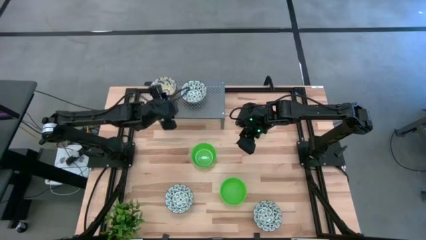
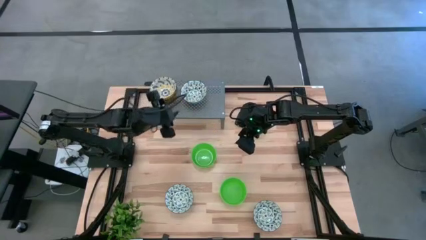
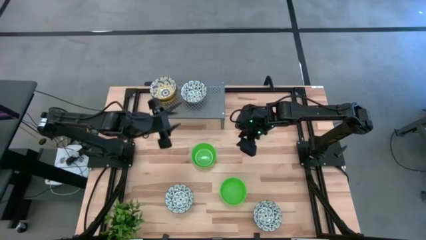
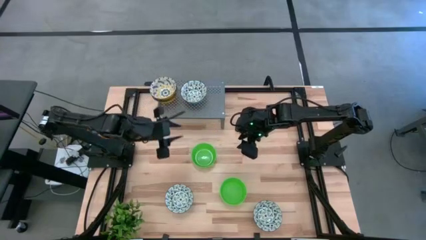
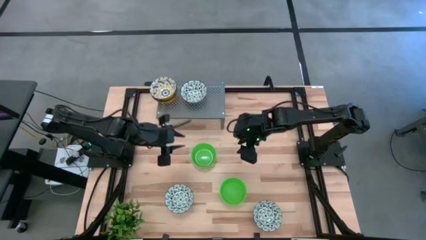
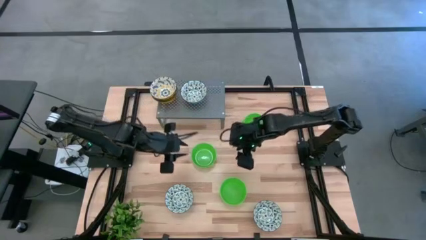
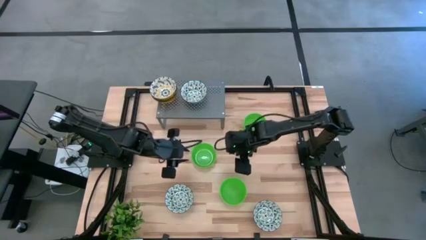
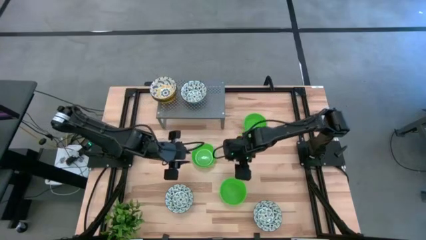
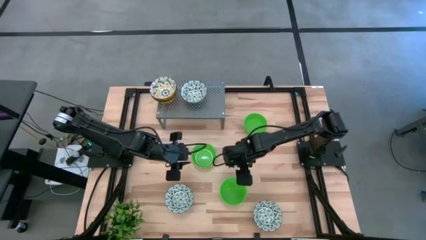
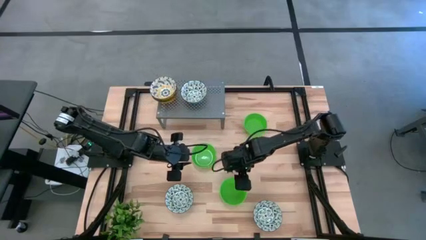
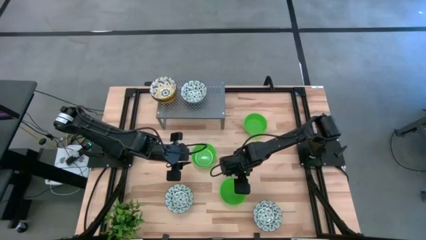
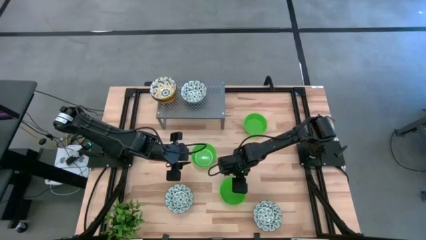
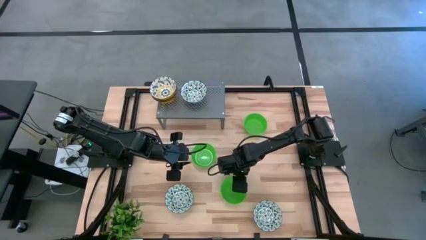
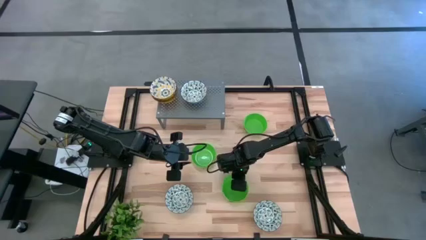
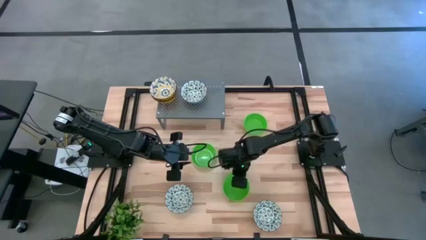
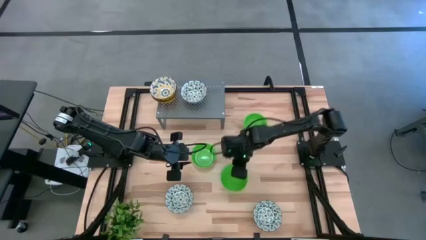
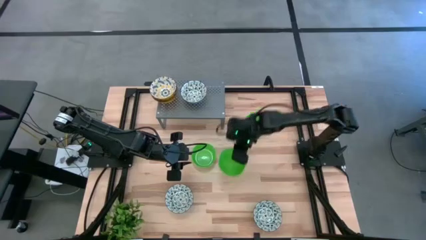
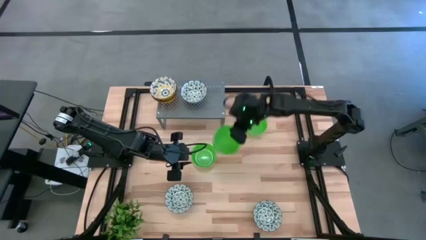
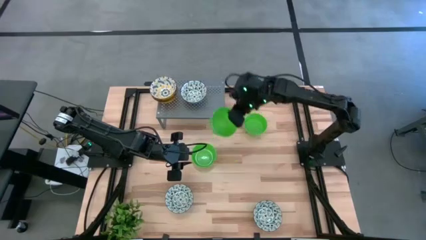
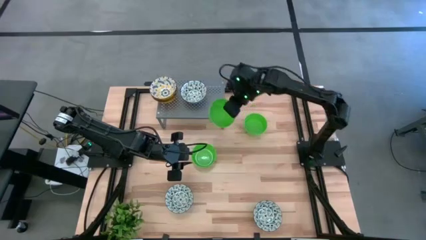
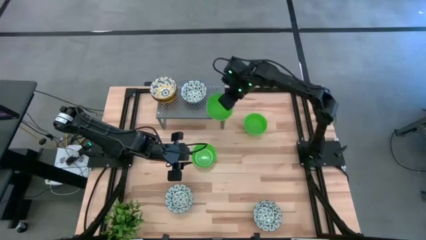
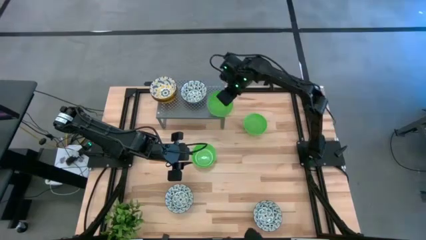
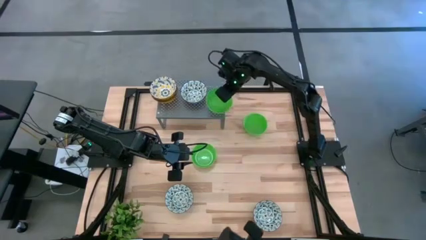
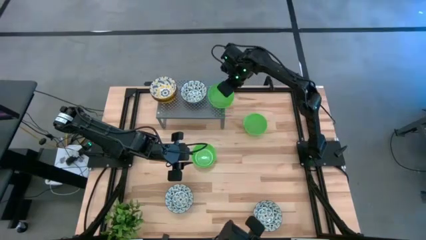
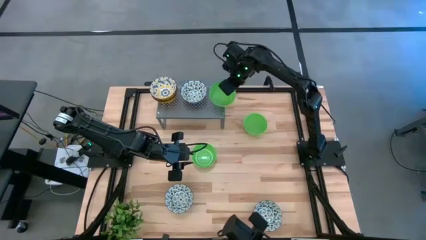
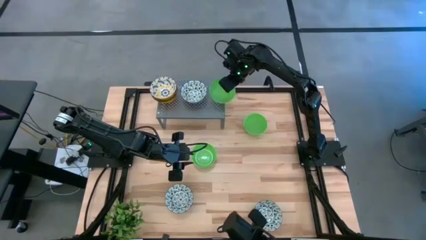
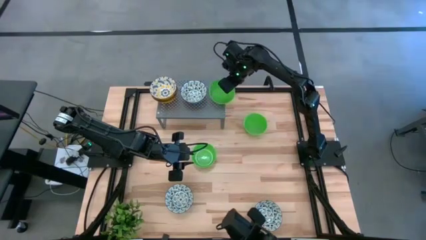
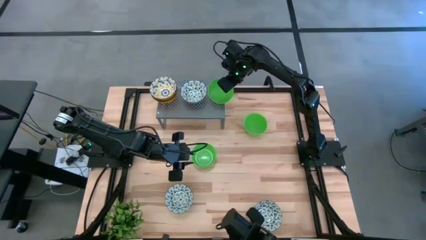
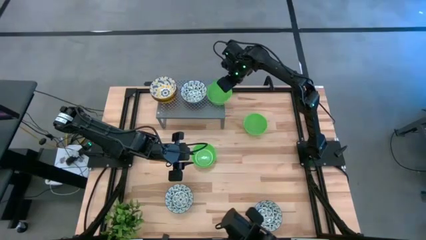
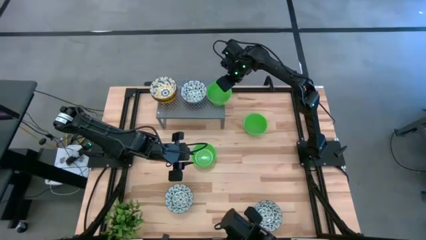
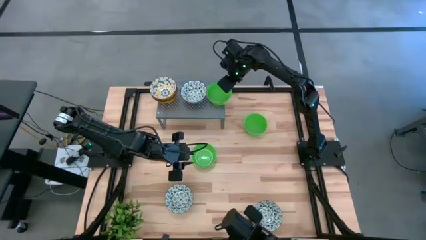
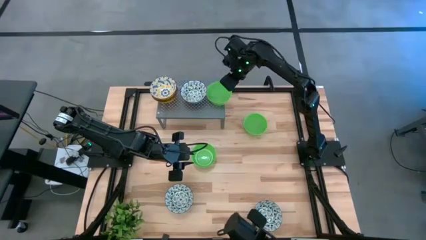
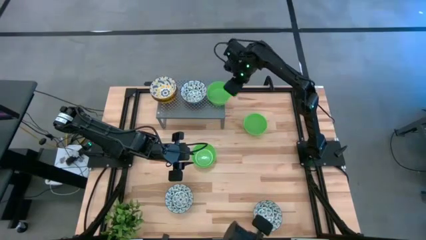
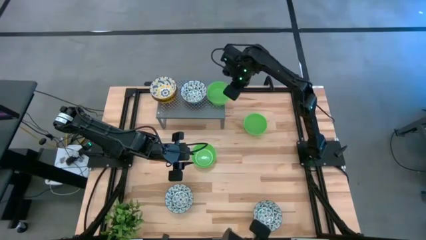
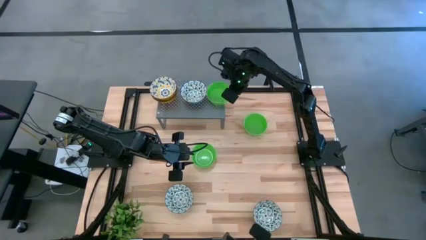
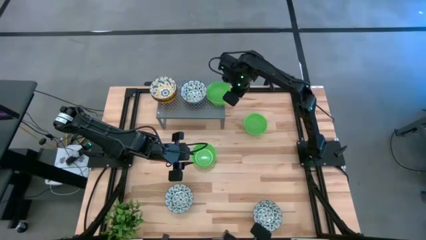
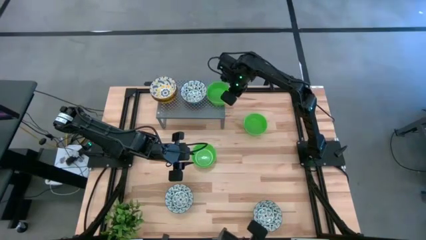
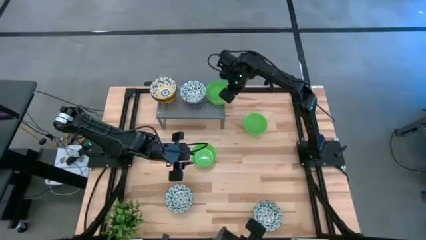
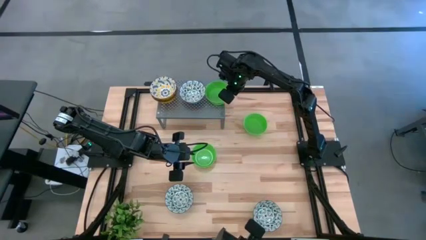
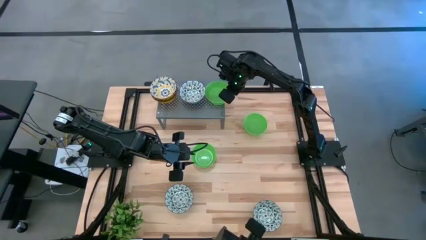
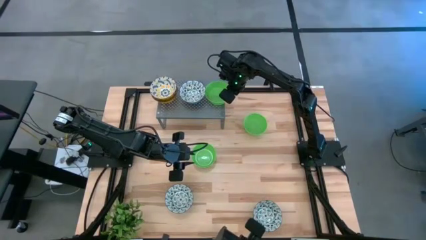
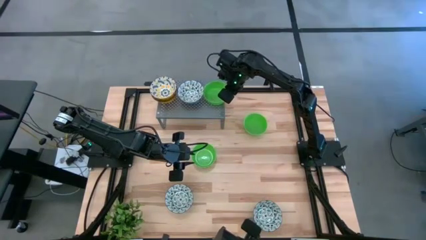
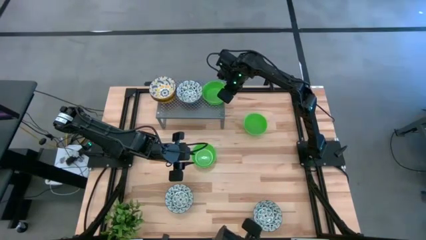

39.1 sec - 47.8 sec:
Task: Pick & Place Mini bowls
Put the bottom green bowl on the shelf

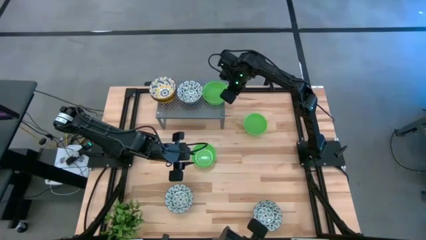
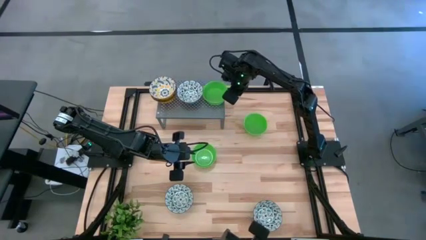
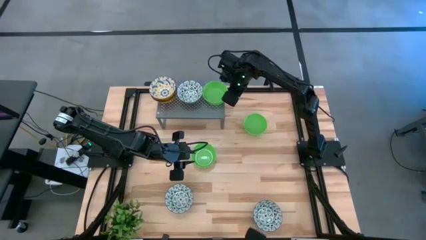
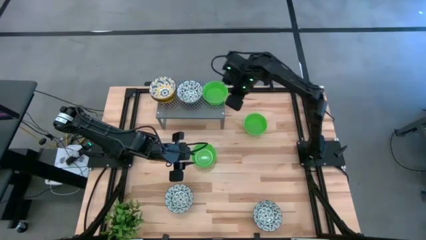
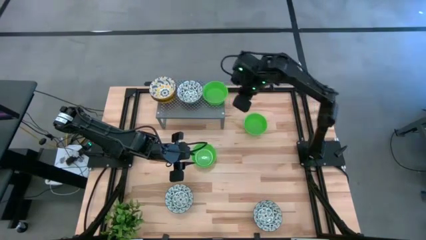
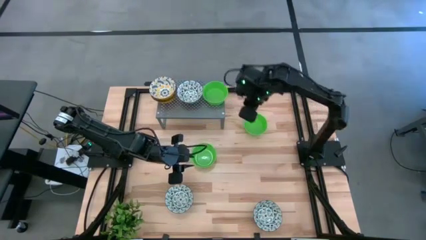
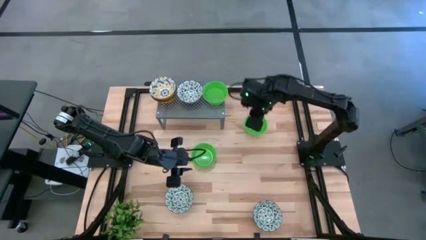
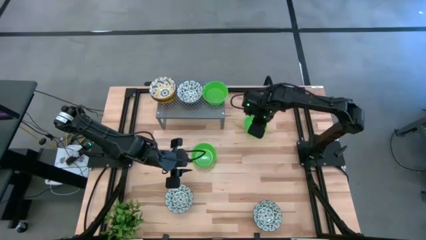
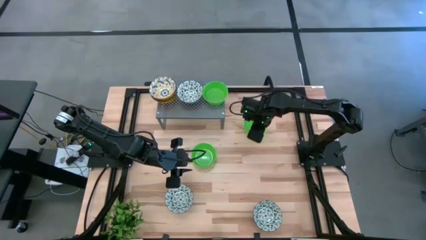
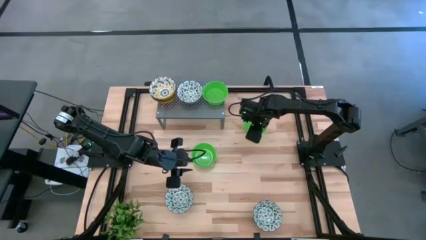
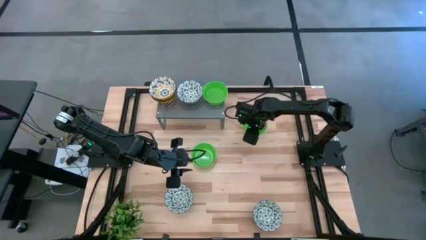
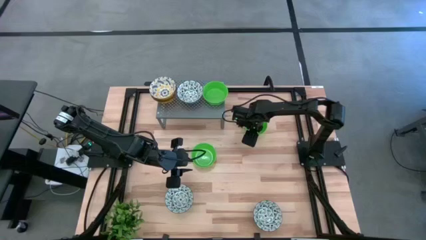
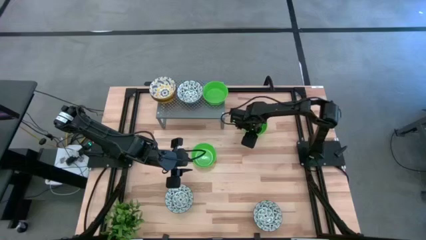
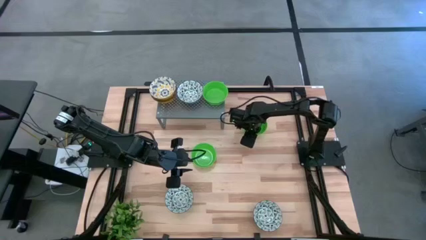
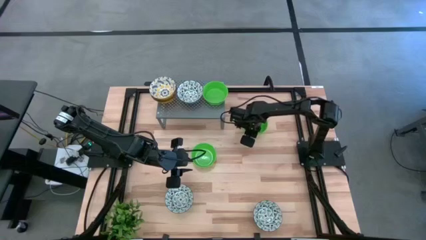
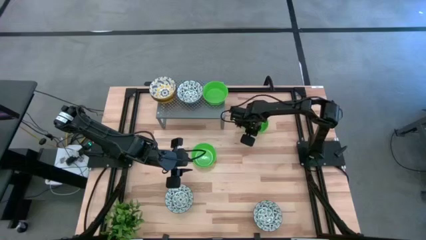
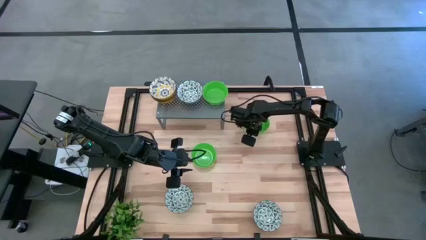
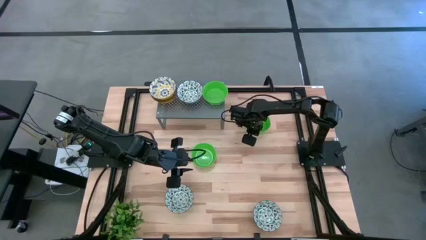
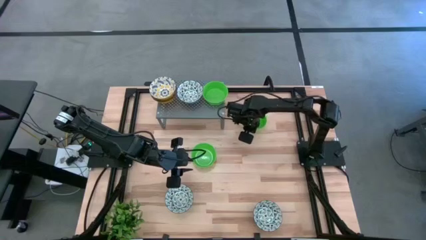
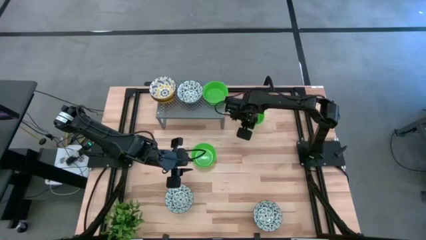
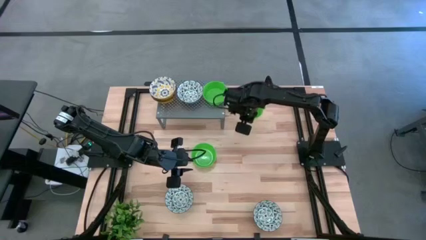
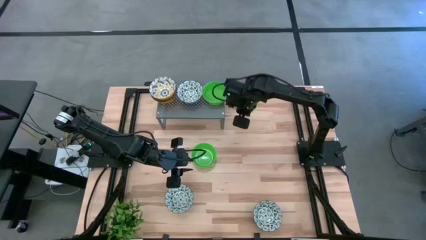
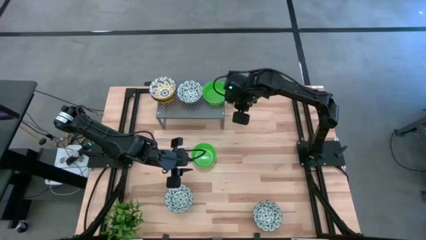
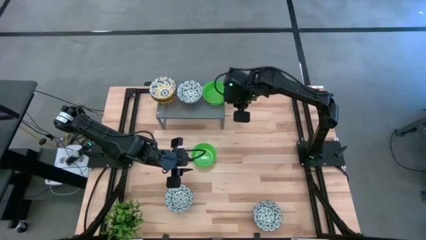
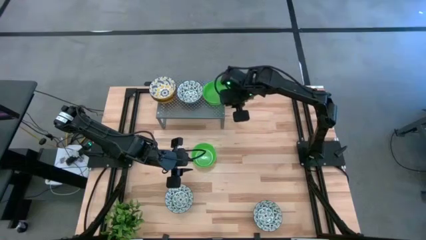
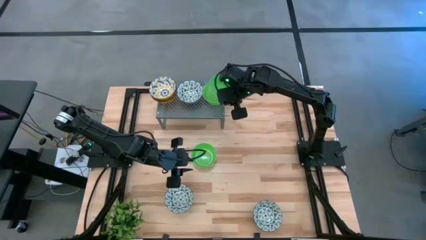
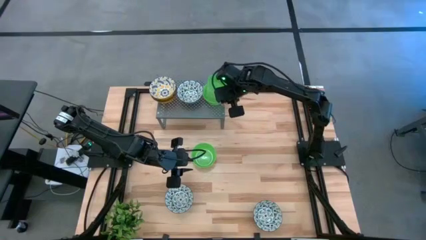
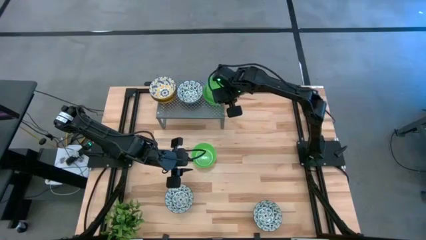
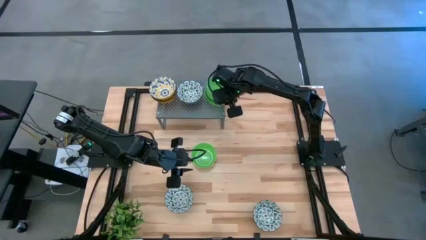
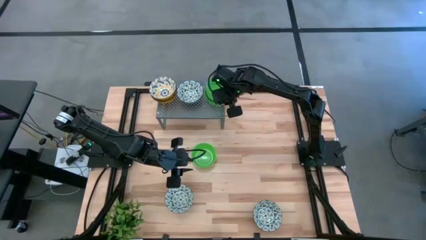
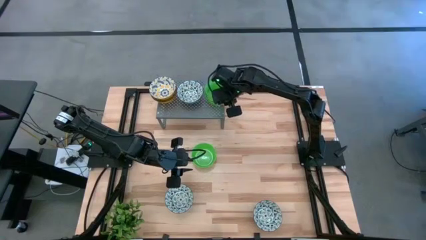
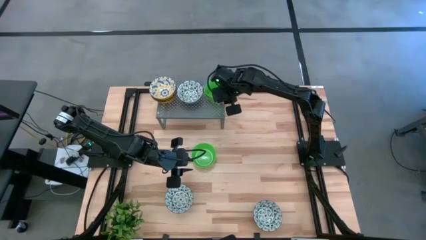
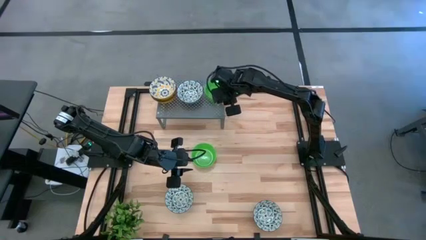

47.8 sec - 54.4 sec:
Stack the right green bowl on the green bowl on the shelf
